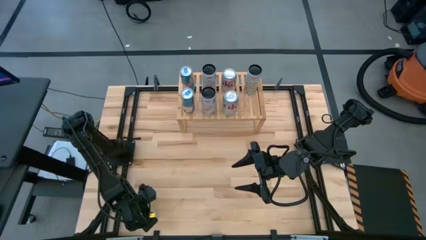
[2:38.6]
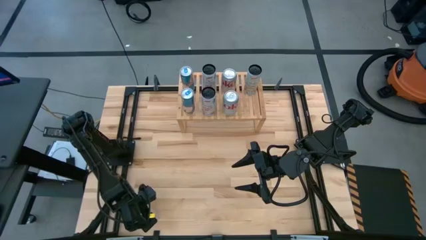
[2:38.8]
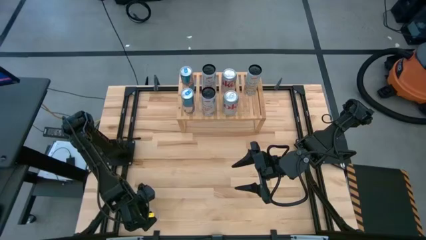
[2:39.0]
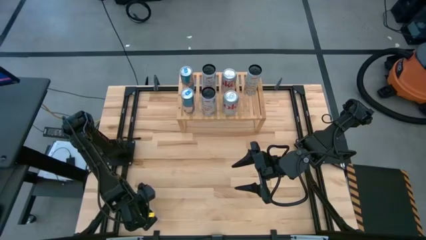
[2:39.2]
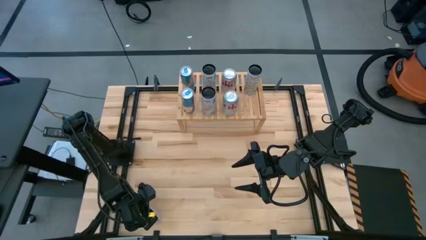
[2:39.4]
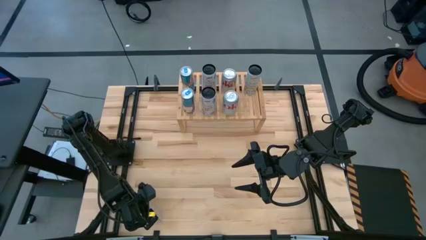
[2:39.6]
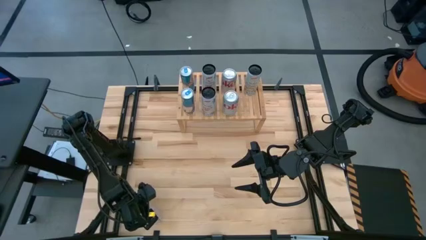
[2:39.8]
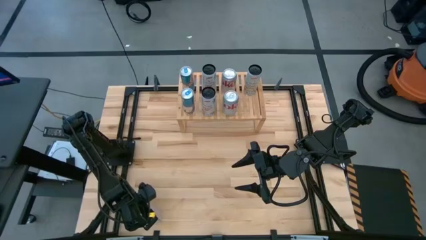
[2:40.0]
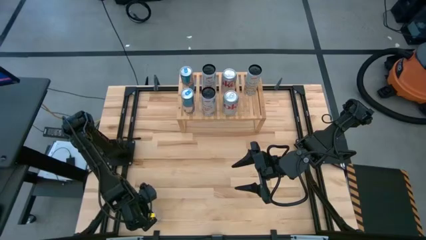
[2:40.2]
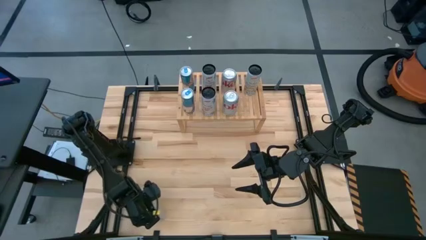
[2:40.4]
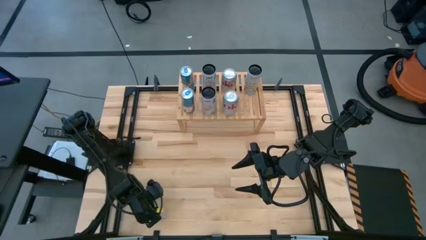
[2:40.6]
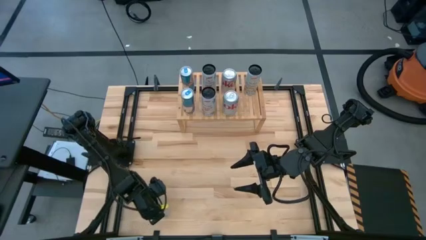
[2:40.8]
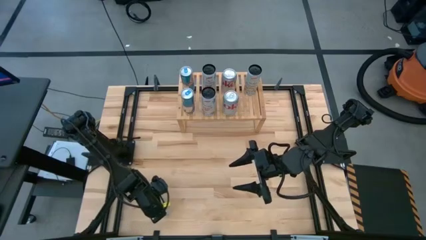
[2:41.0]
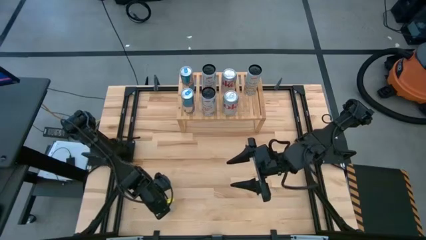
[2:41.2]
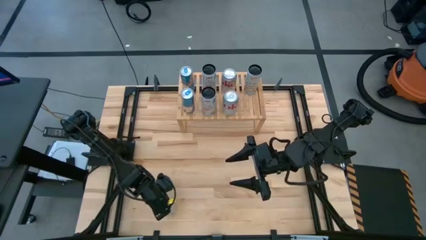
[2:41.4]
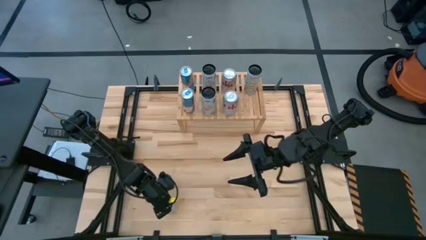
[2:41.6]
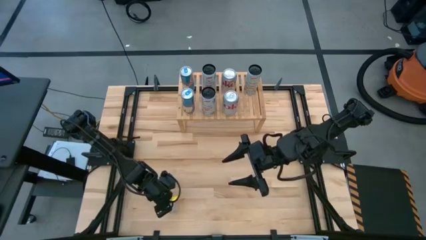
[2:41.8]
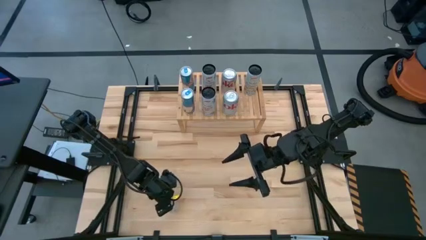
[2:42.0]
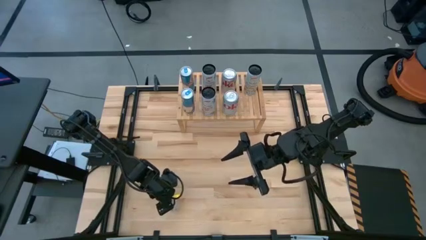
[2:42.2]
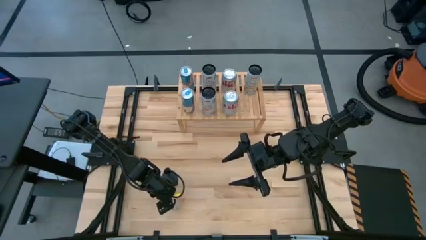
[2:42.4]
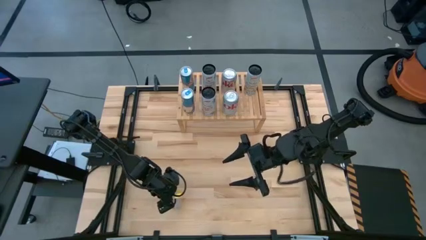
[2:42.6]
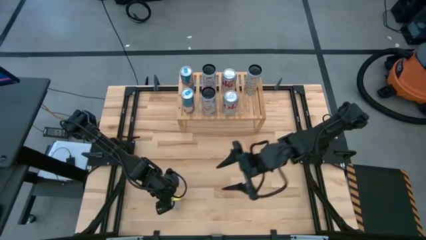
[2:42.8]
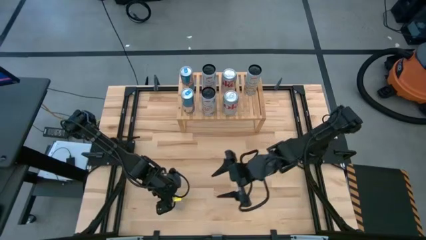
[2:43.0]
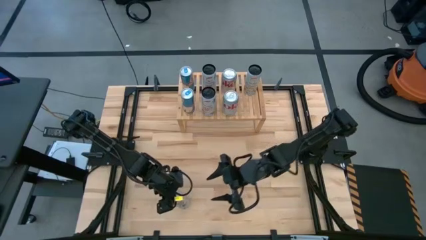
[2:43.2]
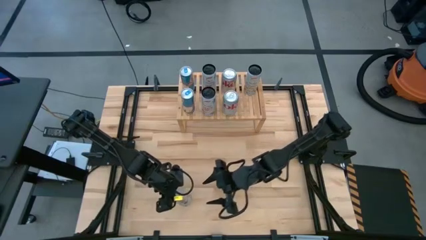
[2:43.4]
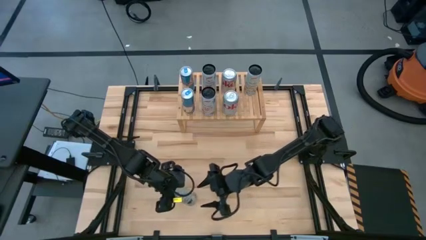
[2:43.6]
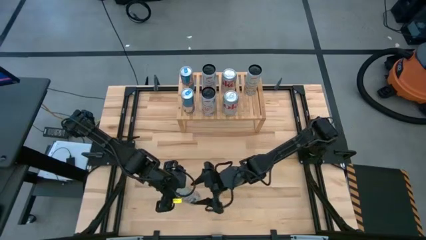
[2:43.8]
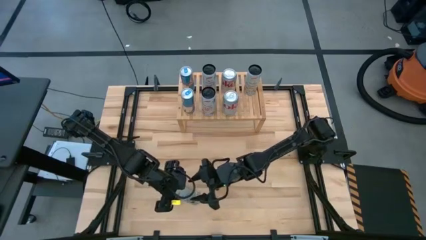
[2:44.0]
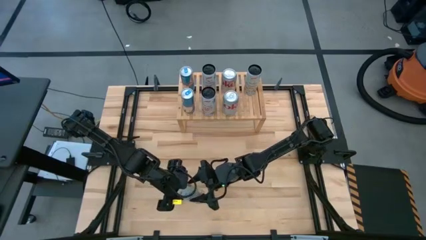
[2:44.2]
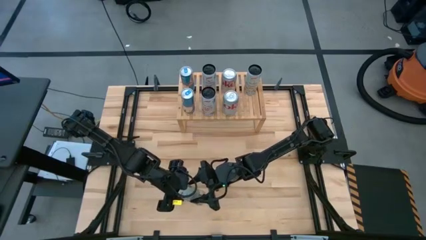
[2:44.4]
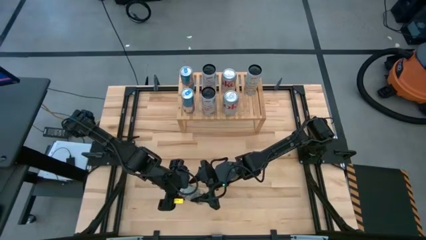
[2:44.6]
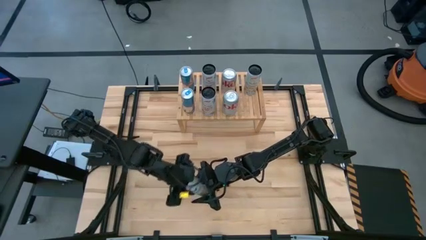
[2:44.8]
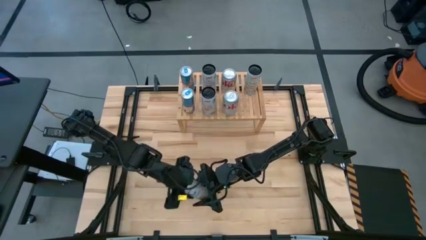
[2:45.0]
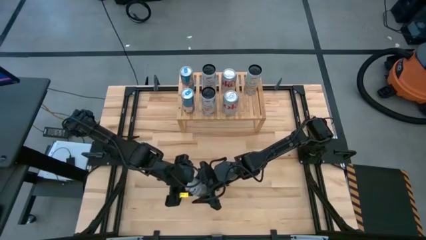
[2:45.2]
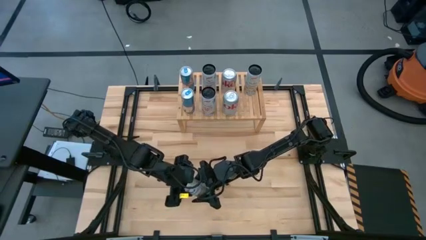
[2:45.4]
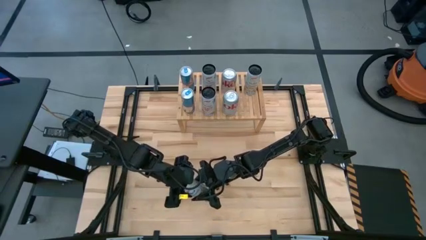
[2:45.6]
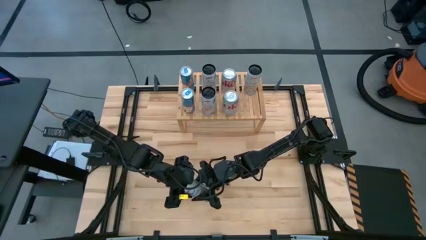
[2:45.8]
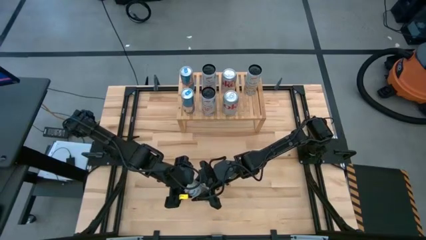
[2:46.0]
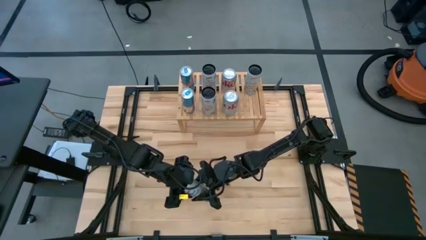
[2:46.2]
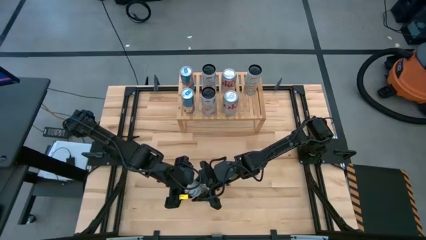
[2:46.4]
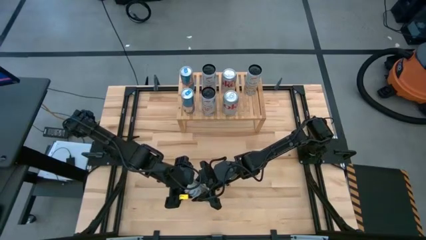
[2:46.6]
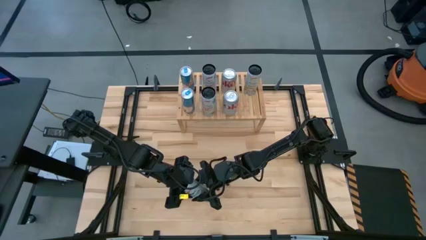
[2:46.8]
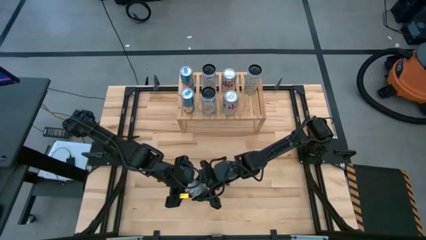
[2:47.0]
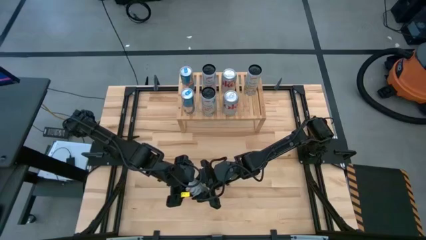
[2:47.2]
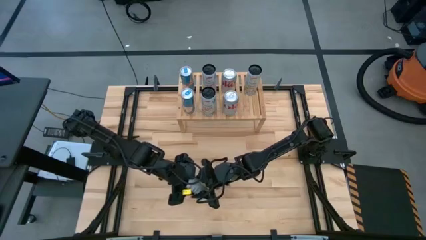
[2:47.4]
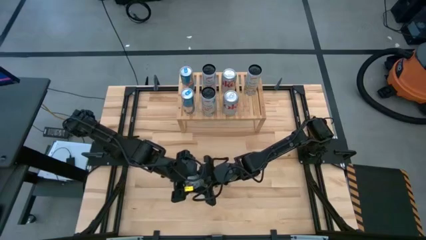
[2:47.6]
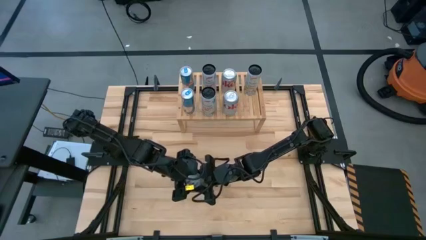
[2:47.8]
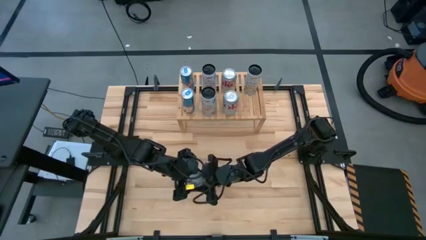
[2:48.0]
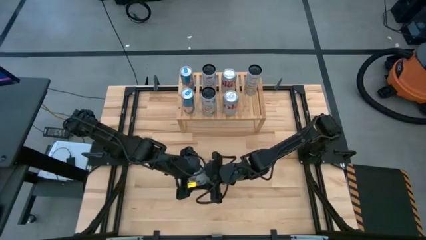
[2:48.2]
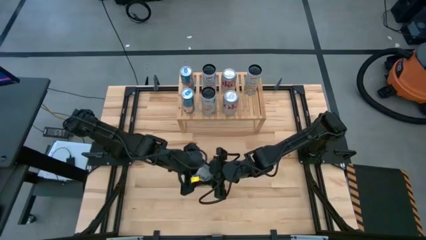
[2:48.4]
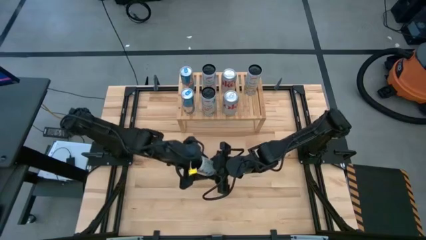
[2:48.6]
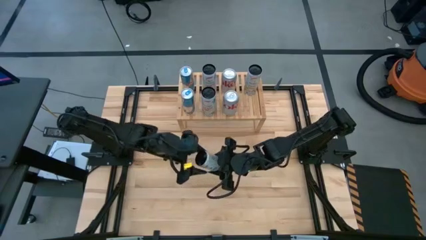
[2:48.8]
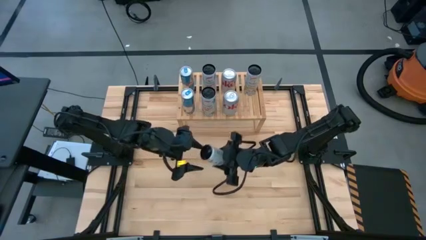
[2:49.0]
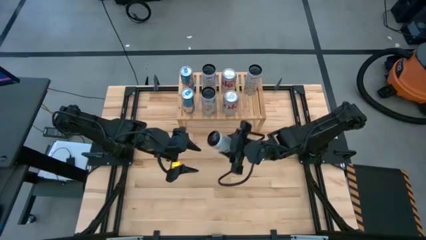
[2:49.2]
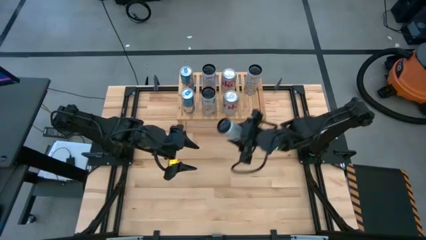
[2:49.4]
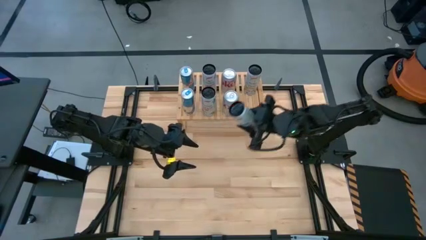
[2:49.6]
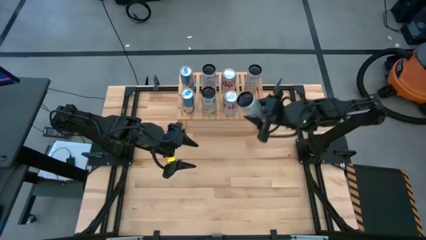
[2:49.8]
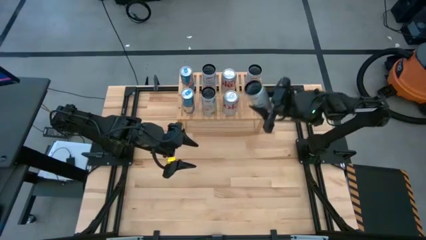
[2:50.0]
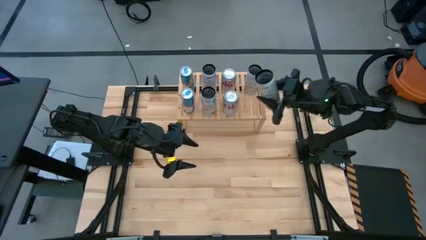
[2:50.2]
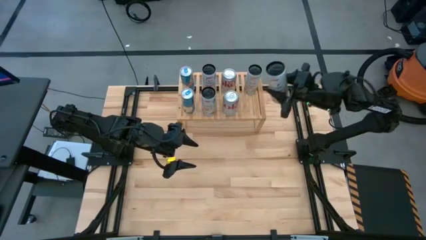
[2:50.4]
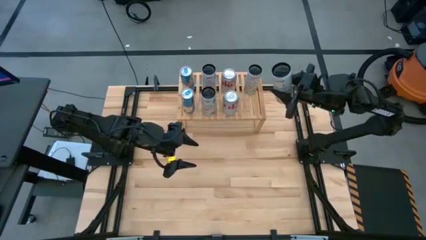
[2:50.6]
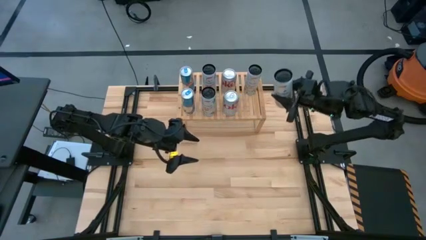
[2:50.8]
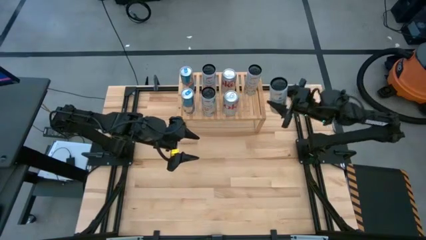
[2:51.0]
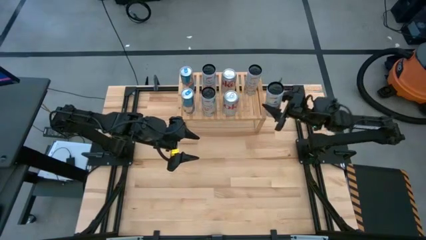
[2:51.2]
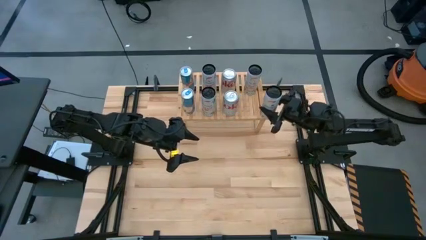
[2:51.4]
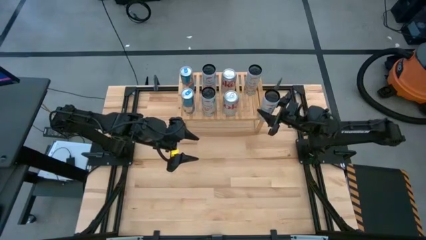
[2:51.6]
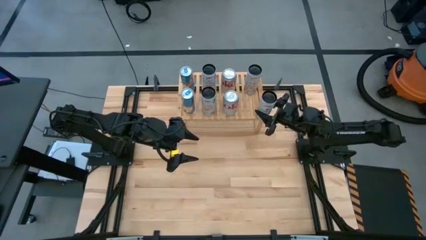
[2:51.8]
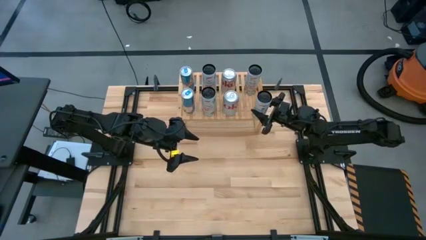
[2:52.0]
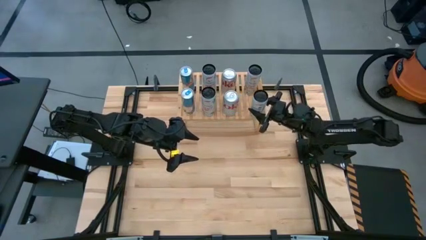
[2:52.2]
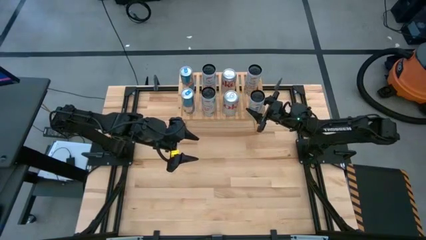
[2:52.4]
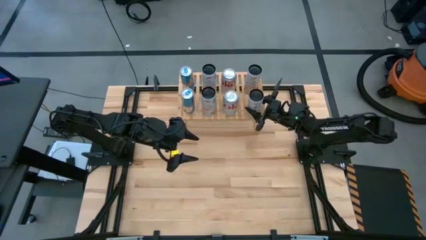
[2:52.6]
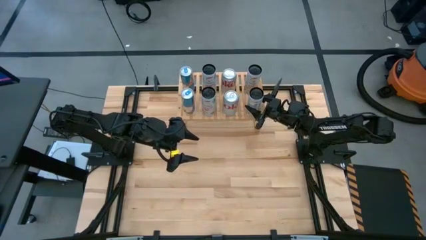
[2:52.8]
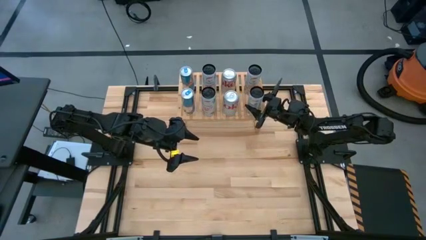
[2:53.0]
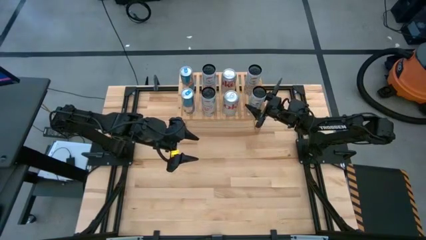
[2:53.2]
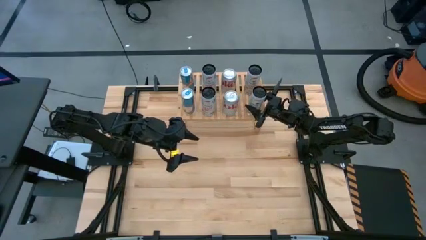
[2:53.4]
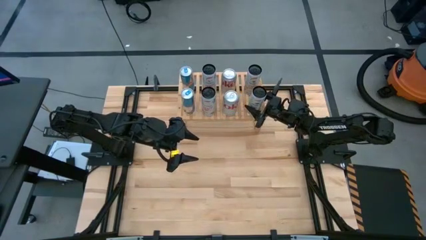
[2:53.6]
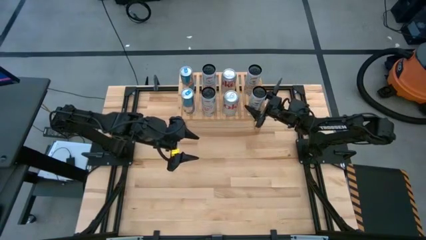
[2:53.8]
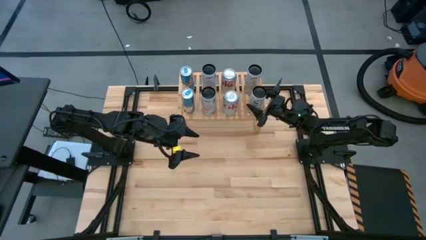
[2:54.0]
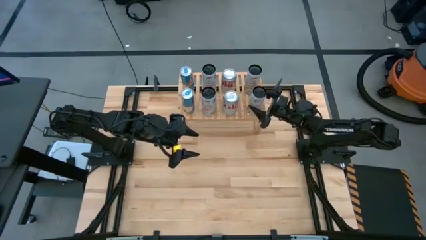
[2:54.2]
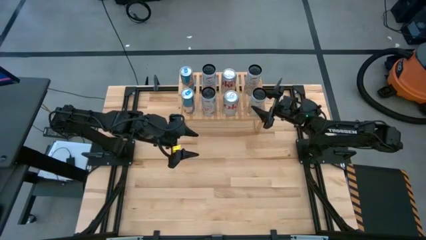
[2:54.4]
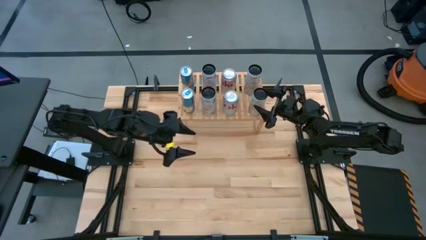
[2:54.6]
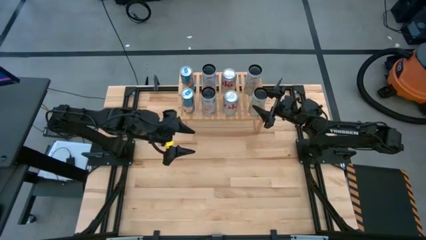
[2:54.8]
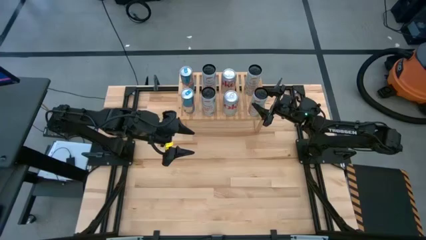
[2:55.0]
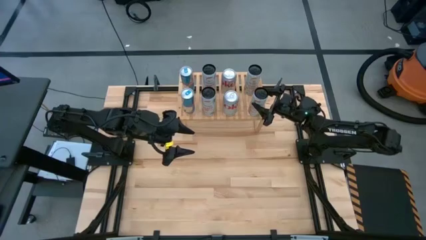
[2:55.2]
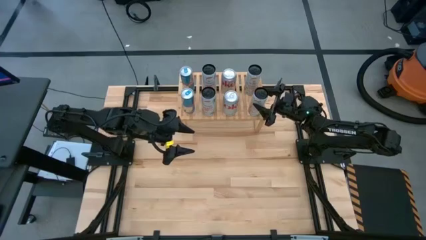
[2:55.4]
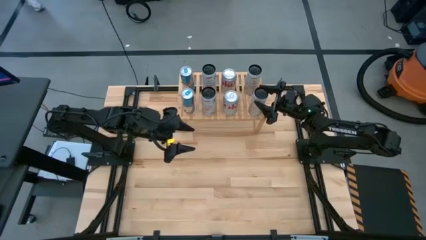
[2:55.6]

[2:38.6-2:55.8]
Task: Place canned beverage on shelf
Put the white and yellow soda can on the shelf aligned with the white and yellow soda can
